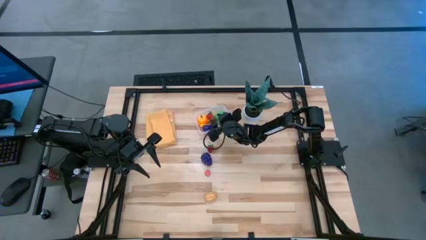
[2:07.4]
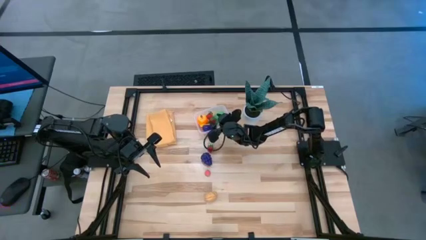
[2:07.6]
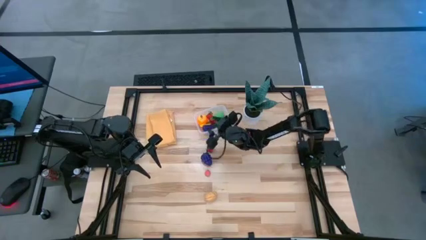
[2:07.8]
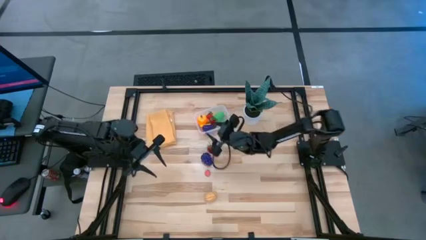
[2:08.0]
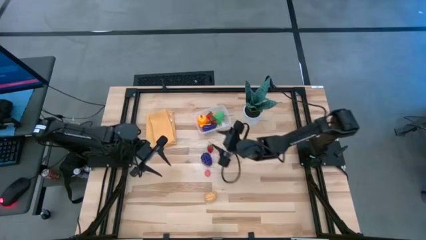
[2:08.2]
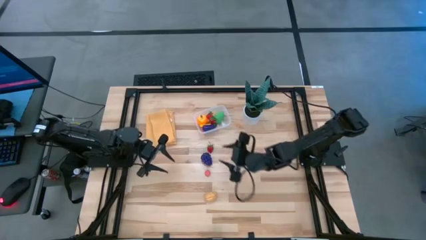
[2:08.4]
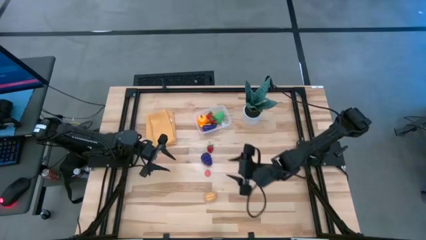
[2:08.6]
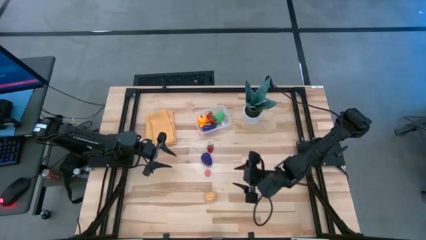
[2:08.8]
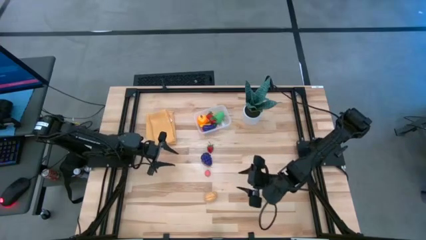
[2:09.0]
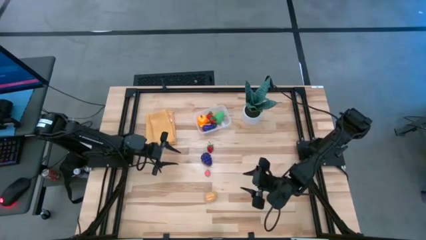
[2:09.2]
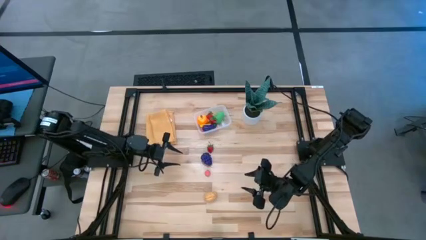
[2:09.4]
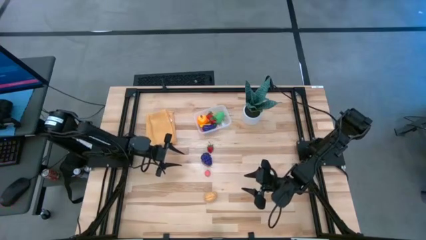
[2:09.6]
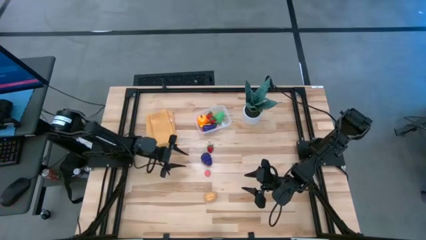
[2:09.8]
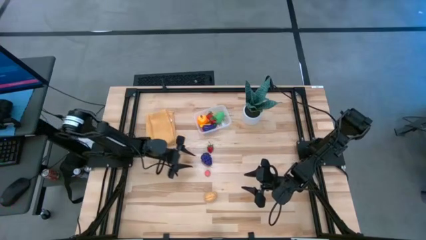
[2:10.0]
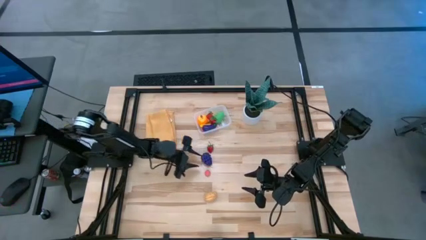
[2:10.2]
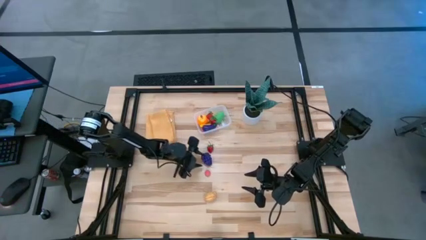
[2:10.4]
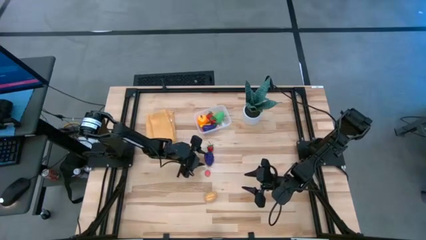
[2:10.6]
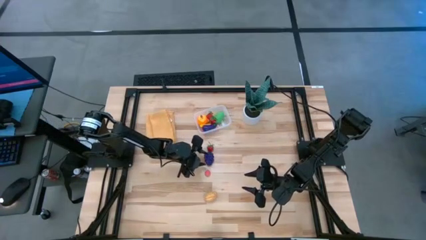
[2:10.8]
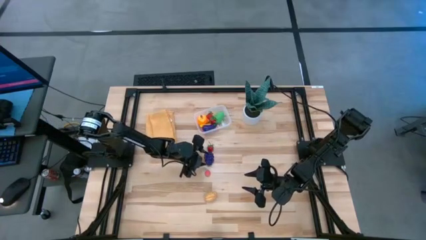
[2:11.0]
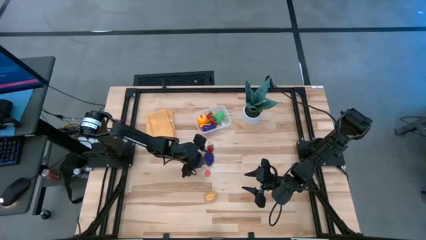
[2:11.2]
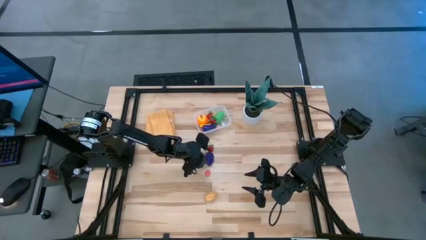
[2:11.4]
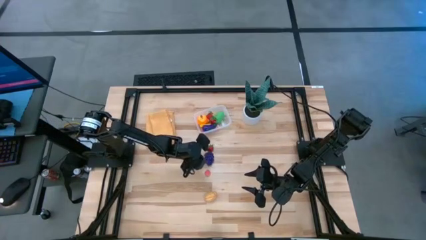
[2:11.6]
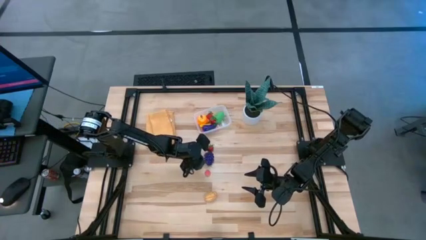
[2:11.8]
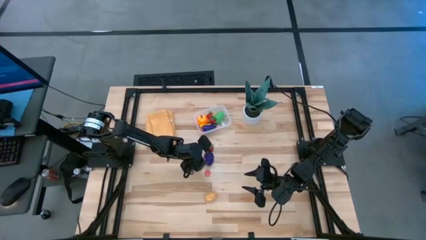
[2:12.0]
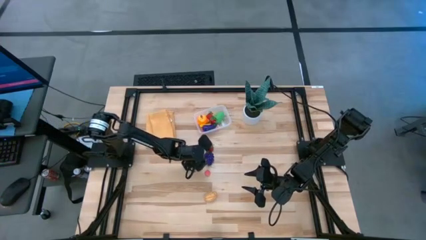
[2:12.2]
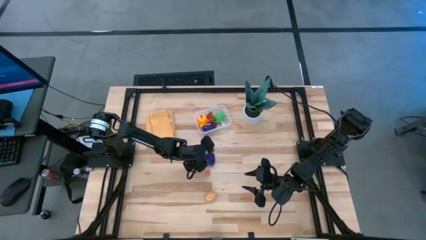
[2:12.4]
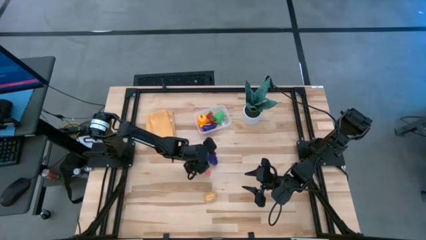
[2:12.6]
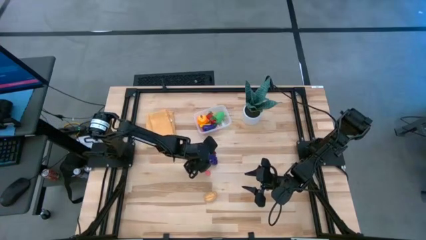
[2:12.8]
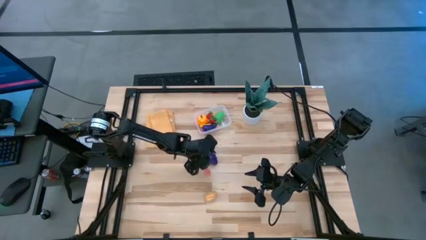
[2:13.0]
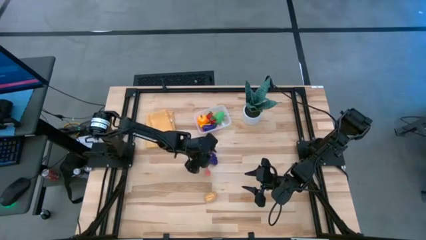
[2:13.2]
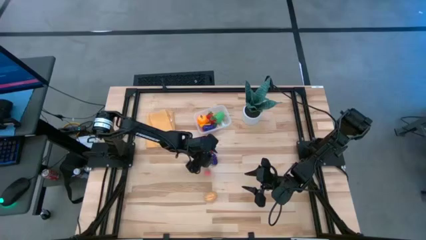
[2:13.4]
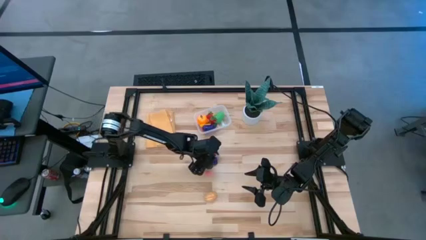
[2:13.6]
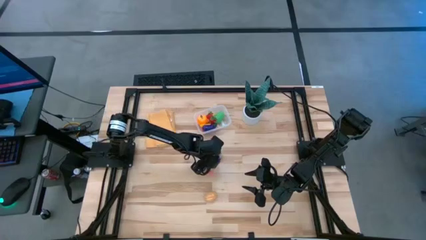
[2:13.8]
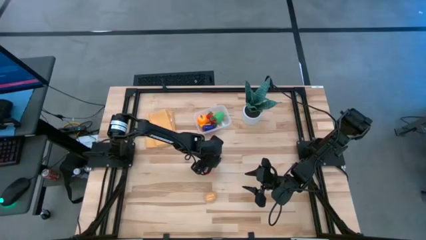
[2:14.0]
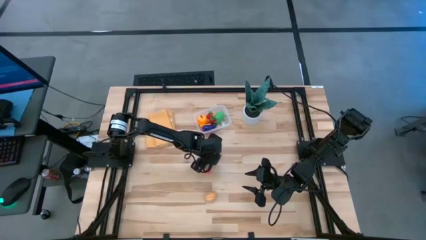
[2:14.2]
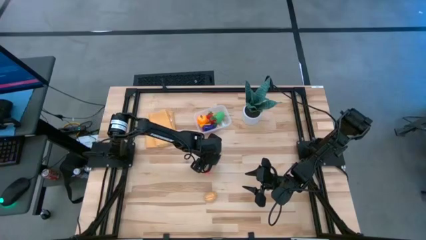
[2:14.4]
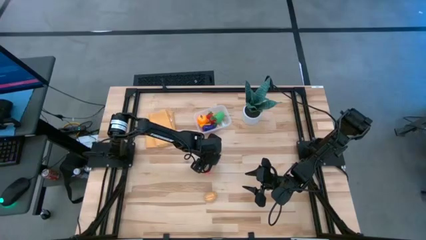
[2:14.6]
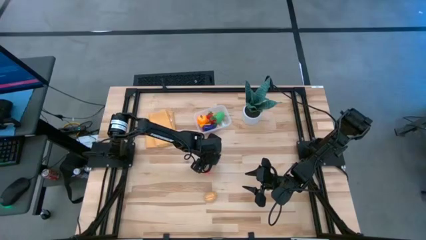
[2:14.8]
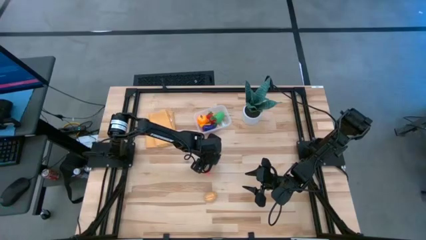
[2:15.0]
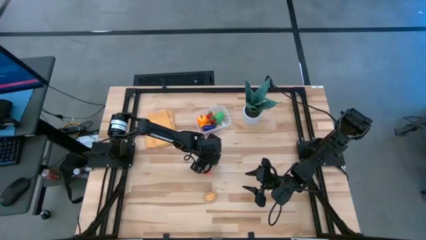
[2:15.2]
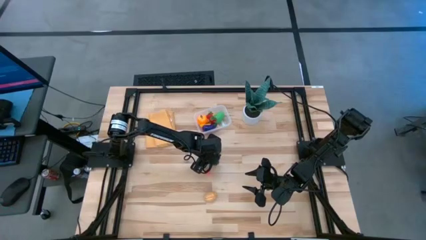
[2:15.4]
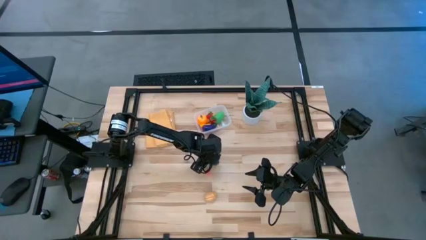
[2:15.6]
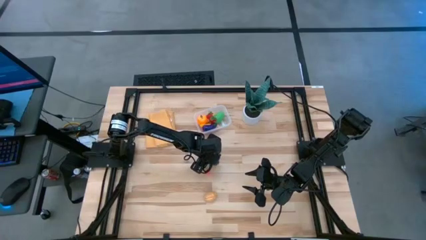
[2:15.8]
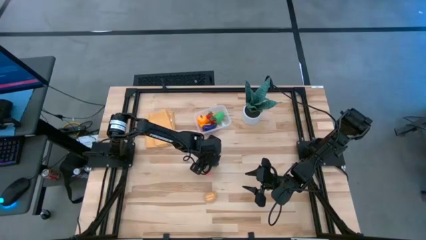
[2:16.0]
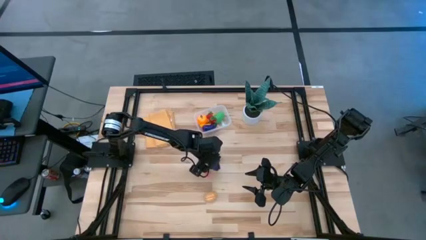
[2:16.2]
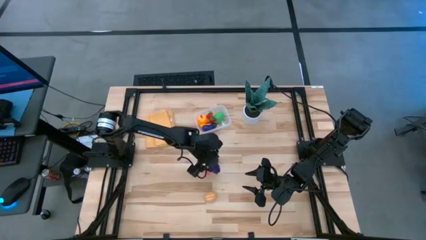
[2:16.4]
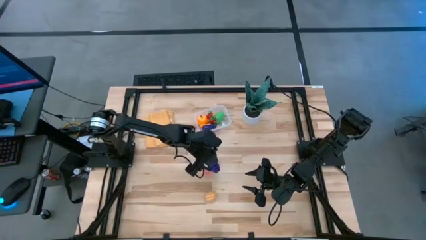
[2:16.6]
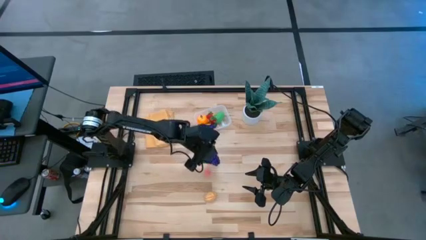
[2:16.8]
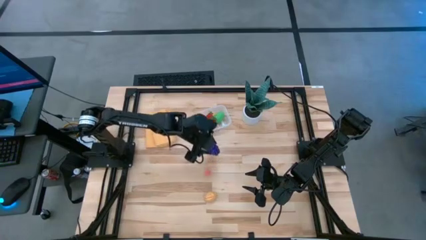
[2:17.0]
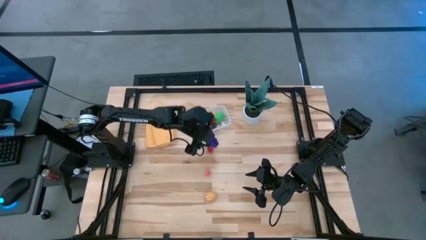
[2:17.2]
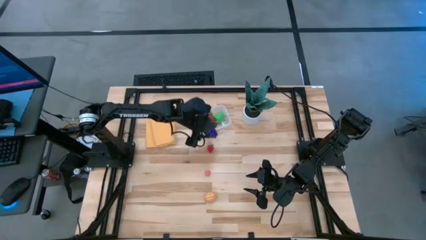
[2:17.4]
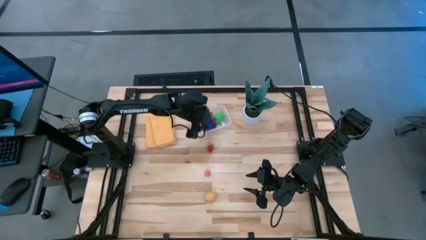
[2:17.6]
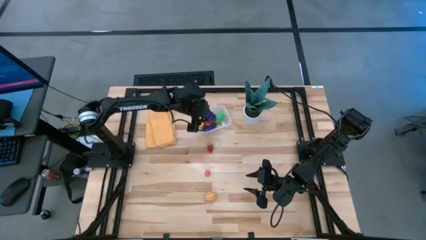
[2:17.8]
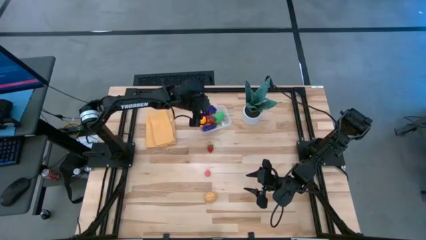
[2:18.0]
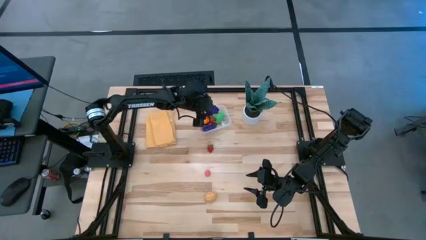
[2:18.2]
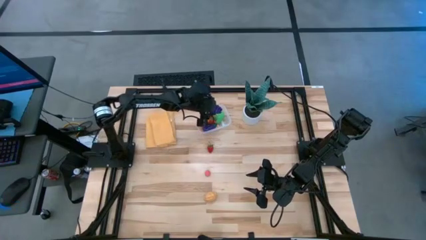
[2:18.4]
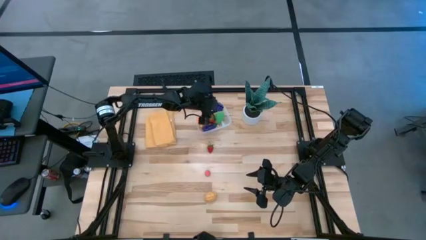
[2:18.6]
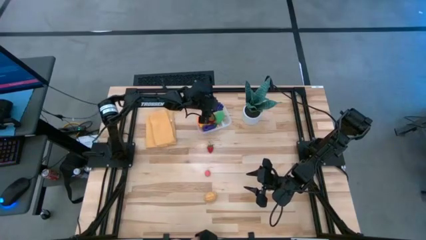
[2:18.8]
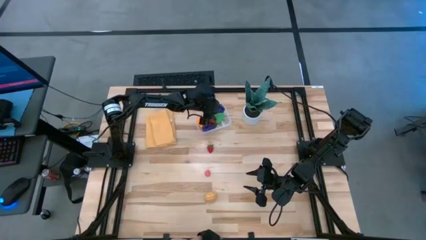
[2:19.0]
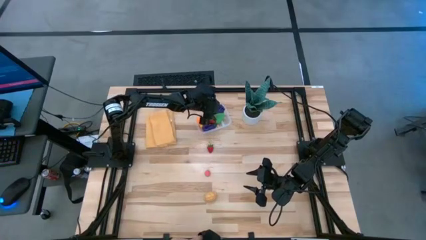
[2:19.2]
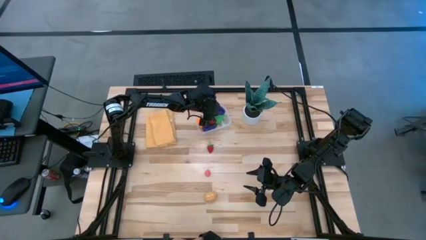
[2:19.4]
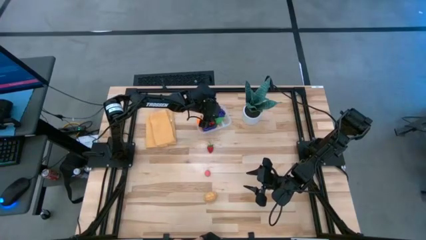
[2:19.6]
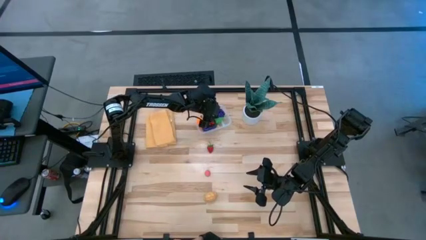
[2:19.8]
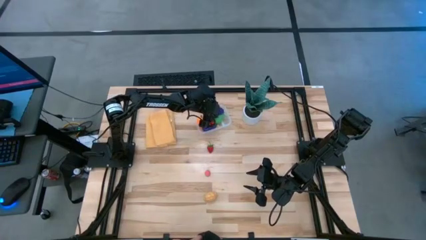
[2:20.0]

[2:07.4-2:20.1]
Task: Pick and placing Produce into tupperware
Put the grapes into the transparent bin

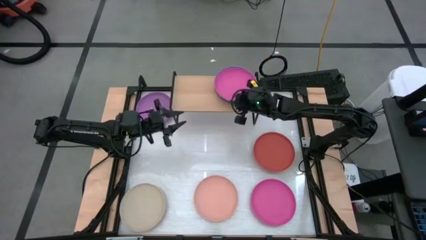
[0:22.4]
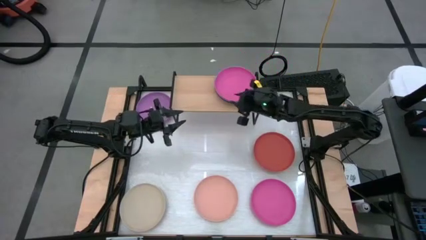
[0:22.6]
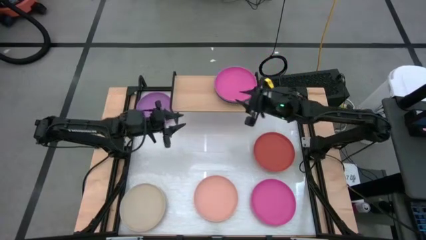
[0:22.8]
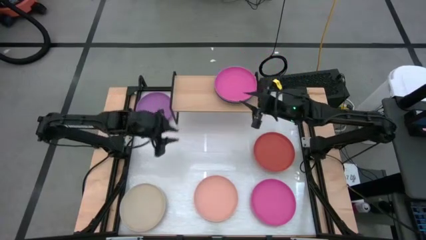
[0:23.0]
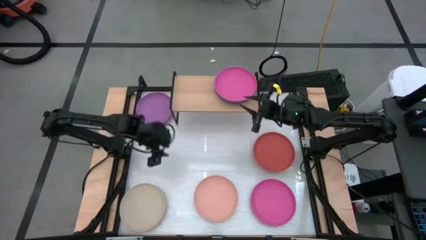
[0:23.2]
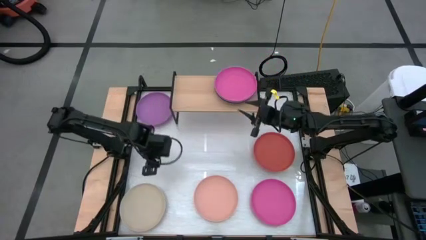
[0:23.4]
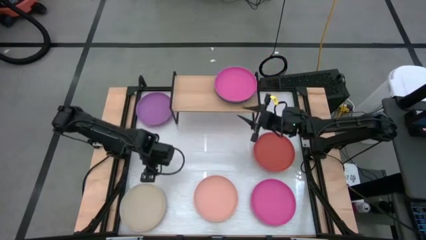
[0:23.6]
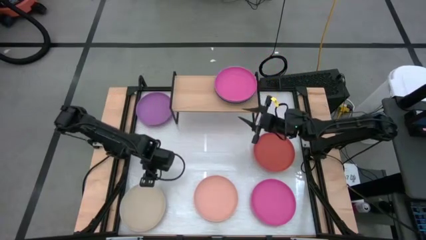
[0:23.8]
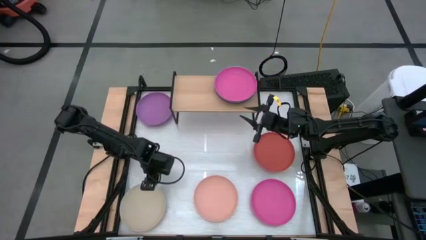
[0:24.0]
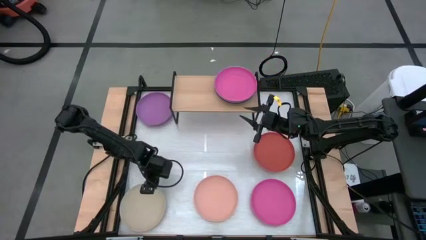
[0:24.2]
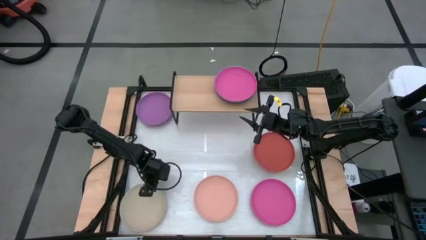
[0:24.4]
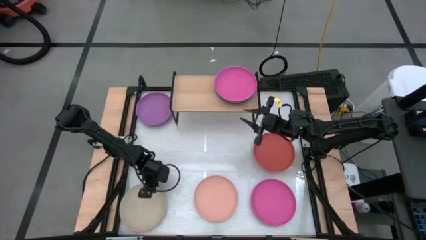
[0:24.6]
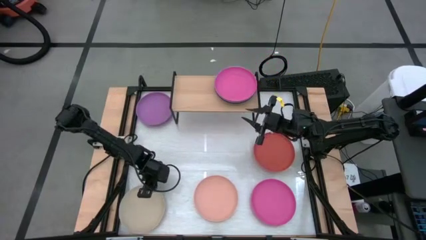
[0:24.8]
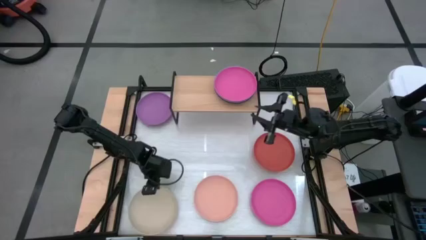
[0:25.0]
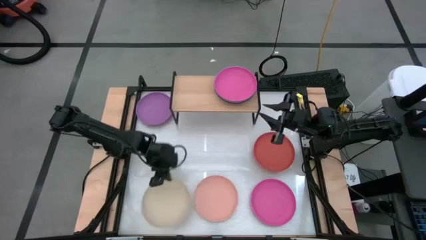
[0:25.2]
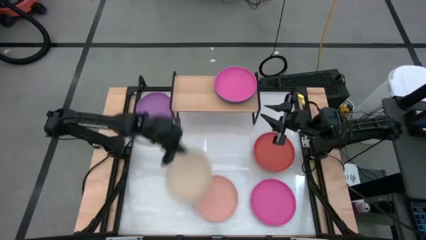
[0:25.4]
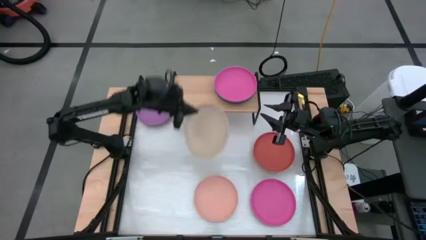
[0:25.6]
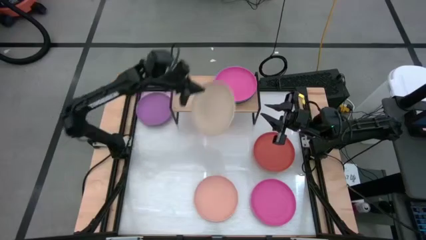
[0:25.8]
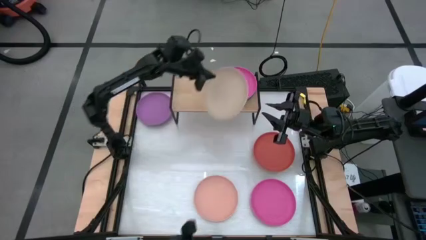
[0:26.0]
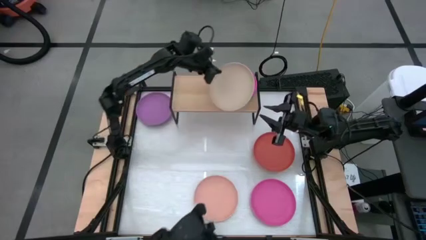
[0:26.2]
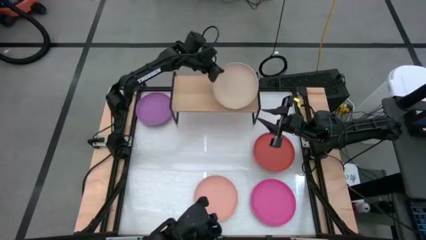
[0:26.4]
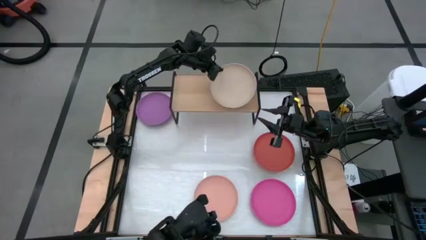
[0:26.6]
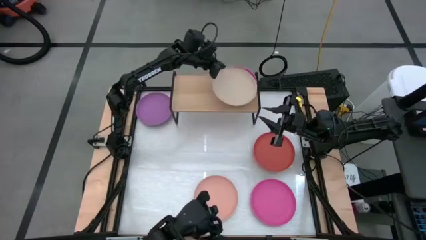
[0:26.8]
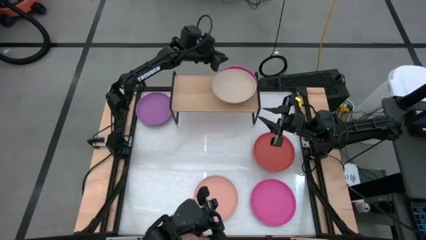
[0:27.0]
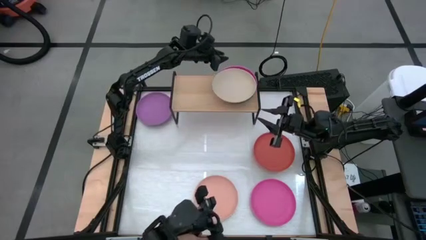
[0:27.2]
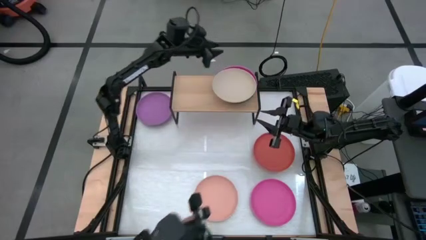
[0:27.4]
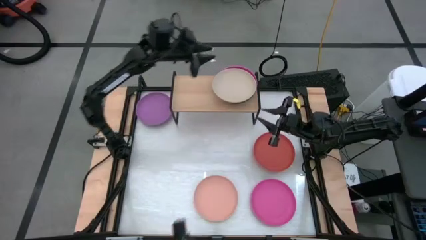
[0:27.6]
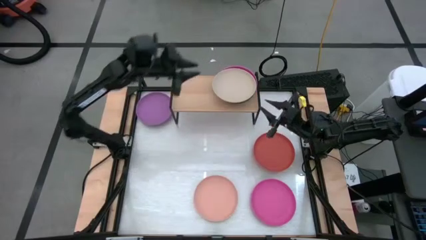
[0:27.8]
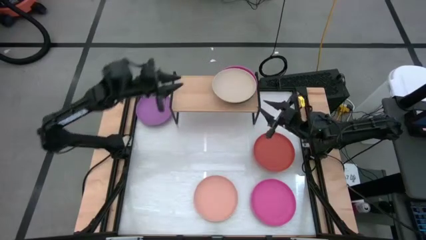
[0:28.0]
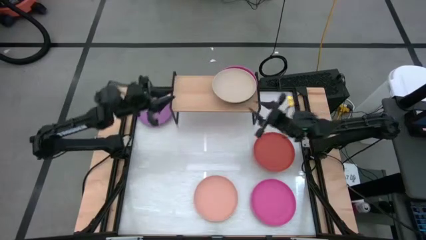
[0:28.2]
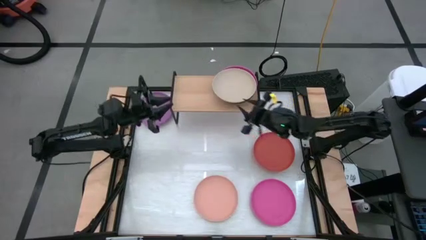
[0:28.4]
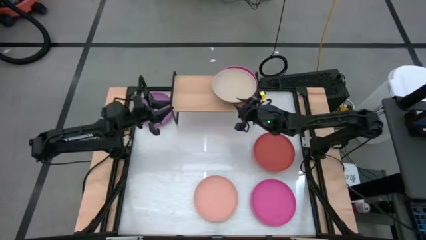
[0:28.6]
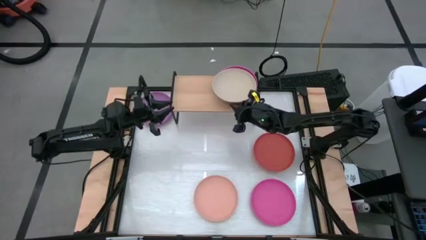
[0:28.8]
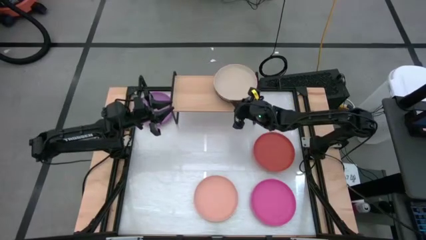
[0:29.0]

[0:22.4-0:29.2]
Task: Place and stack plates onto a shelf
Stack the white plate on top of the pink plate on the shelf
